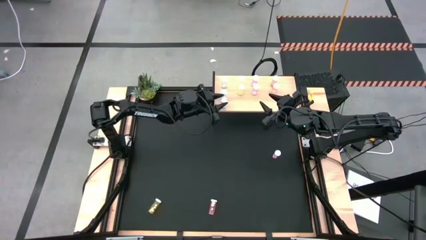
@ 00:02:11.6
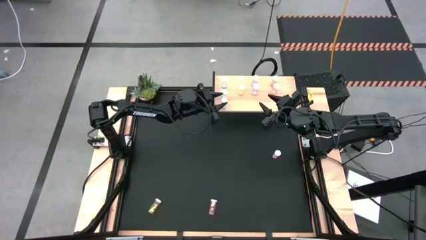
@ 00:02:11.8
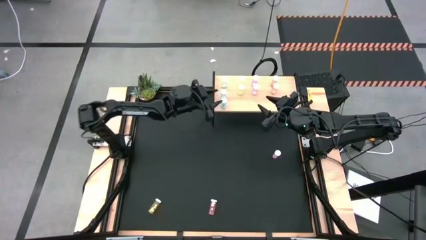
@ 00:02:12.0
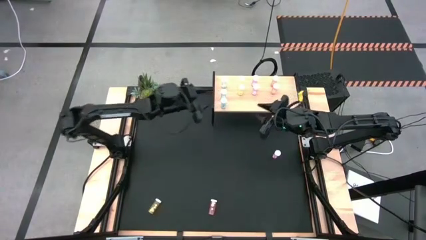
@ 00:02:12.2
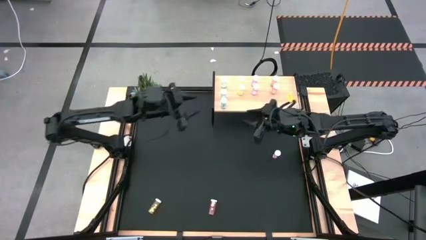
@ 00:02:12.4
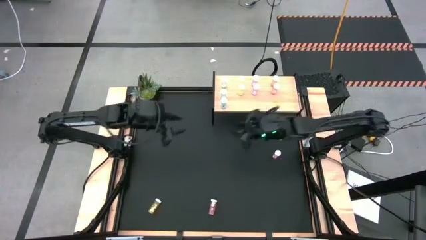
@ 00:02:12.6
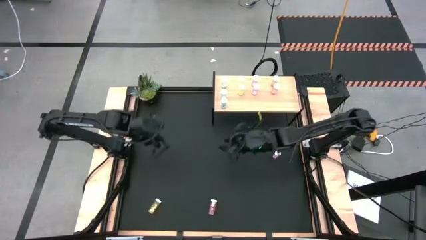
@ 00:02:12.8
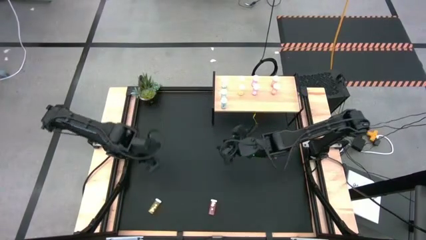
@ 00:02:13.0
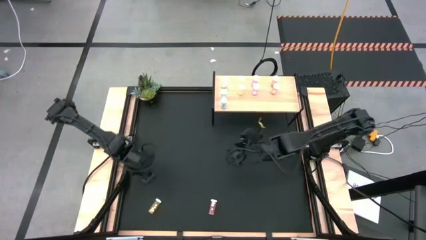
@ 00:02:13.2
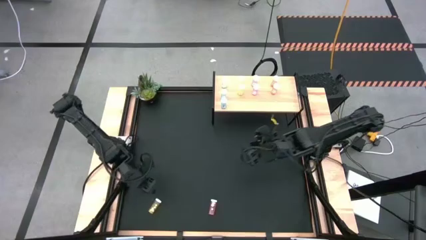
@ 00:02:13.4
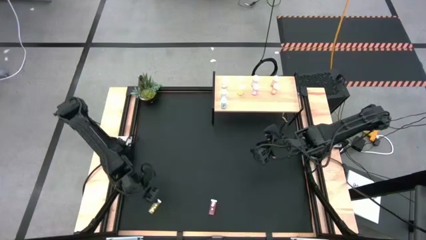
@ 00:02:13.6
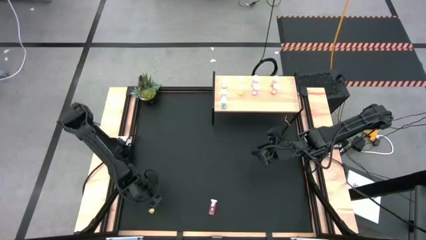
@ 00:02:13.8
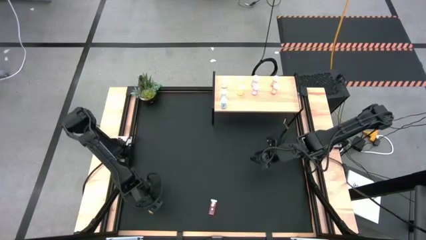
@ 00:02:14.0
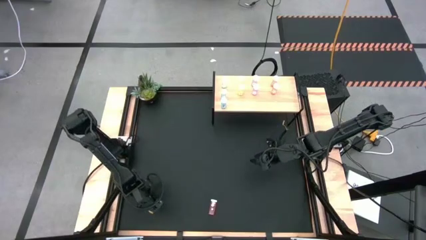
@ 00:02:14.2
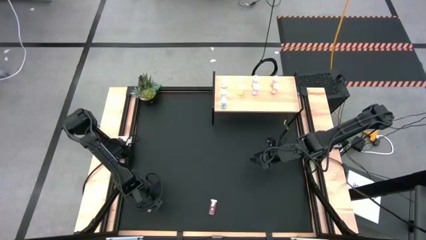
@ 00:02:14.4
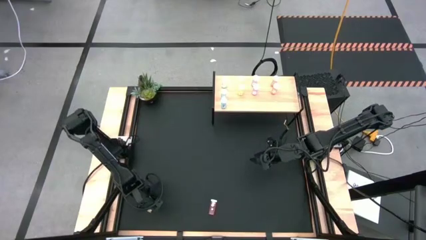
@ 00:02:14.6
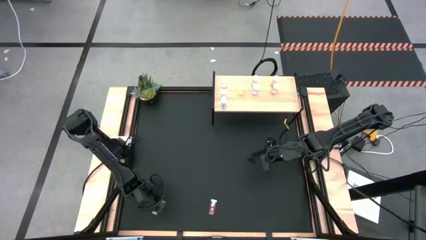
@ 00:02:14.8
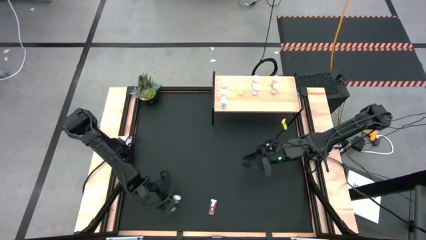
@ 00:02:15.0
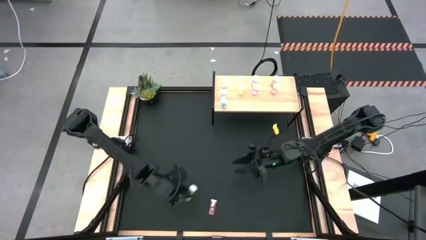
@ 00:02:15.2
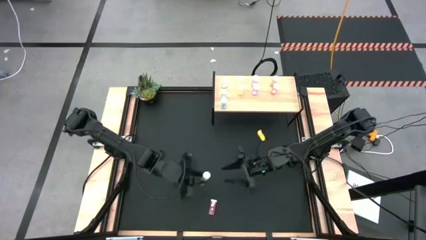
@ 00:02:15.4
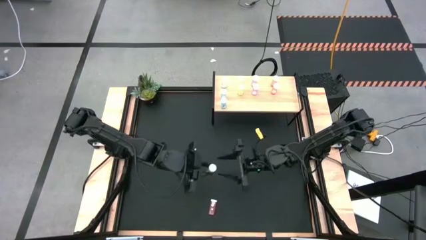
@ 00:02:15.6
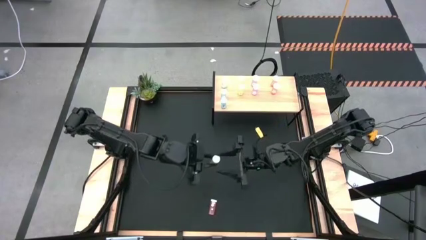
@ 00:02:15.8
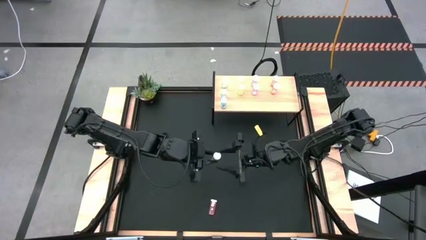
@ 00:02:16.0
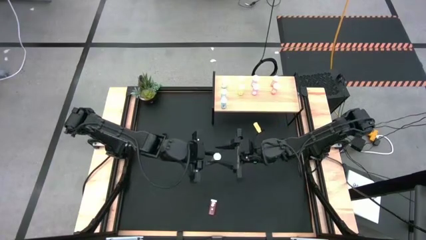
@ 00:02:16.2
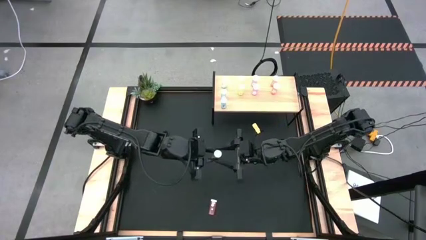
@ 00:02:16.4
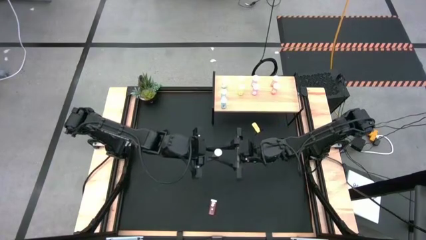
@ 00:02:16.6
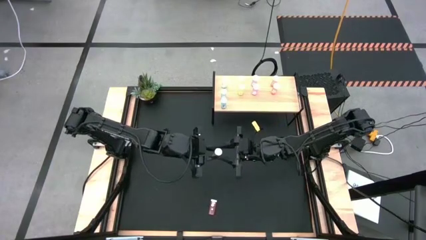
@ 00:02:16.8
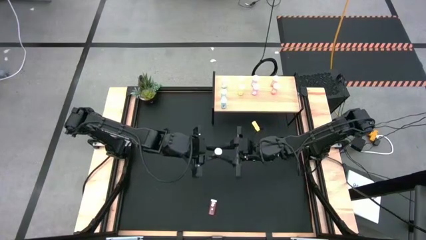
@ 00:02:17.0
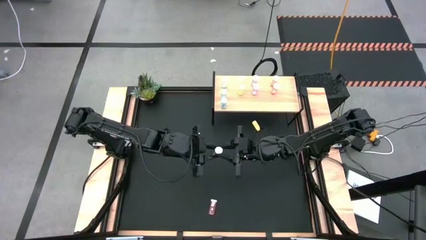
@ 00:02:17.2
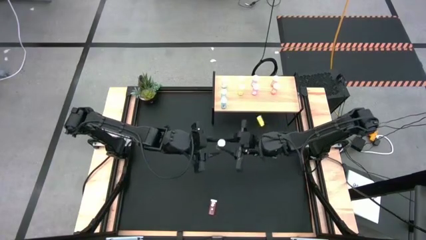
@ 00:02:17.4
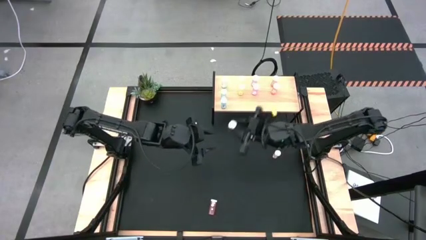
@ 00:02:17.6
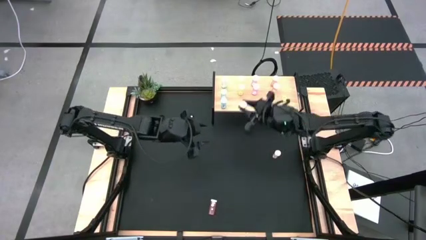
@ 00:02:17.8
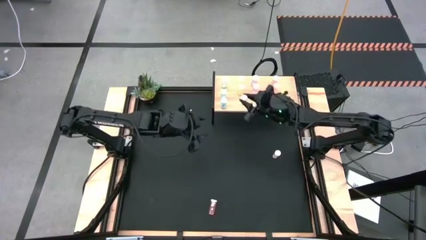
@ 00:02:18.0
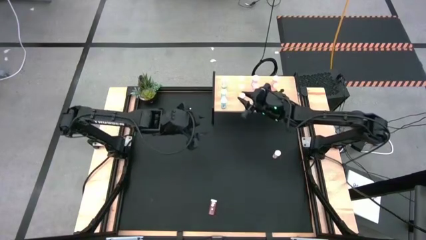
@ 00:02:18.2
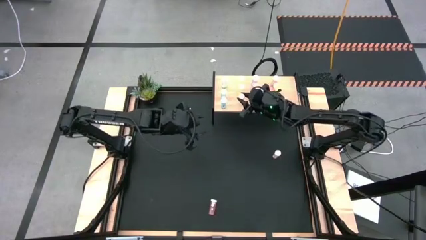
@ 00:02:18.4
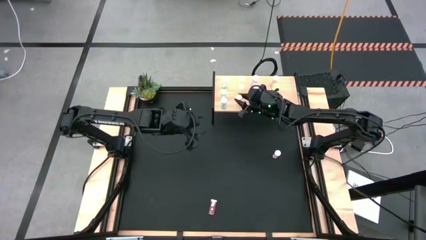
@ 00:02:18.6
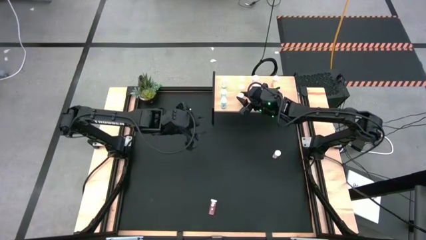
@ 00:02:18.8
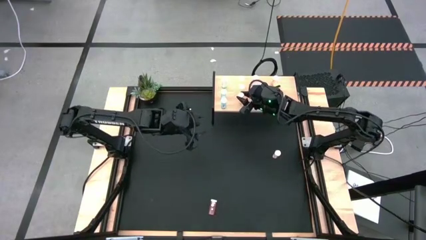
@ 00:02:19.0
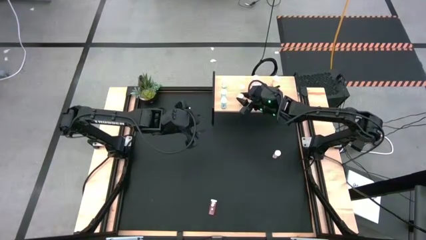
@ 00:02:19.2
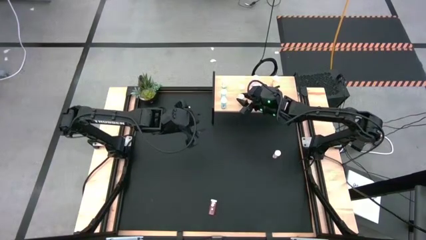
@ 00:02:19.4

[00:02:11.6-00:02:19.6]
Task: Pick and place medicine bottles onto shelf by color
Put the yellow pill bottle on the shelf aligned with the other yellow pill bottles

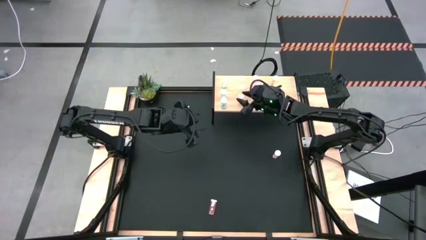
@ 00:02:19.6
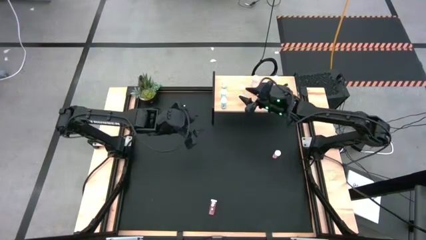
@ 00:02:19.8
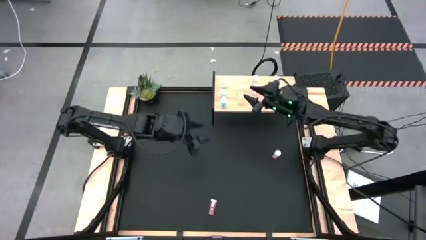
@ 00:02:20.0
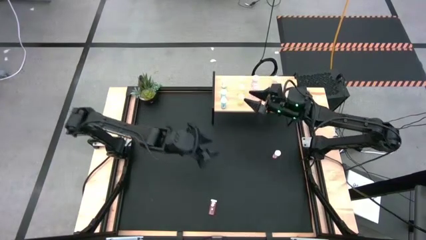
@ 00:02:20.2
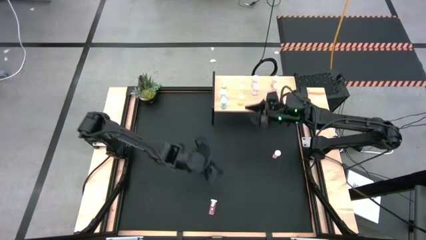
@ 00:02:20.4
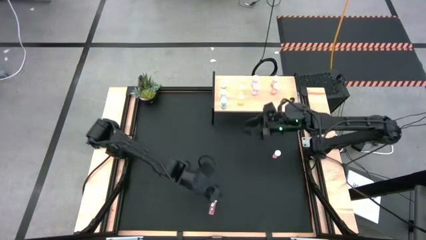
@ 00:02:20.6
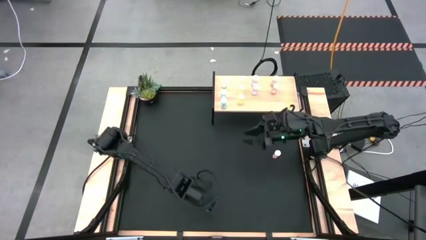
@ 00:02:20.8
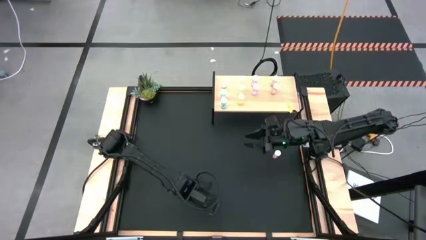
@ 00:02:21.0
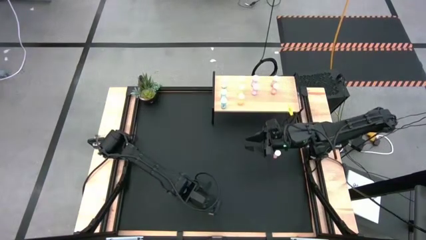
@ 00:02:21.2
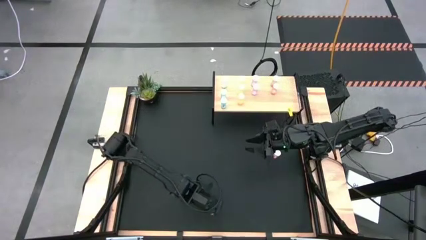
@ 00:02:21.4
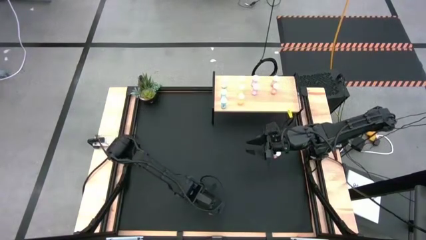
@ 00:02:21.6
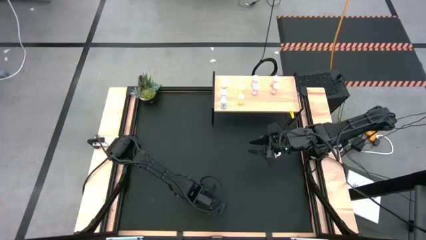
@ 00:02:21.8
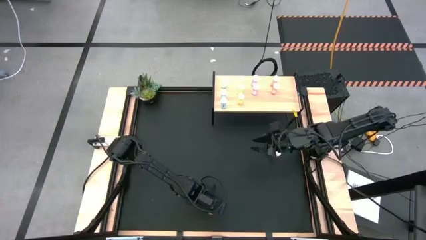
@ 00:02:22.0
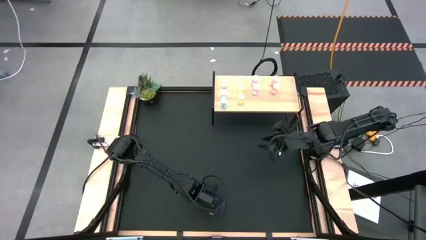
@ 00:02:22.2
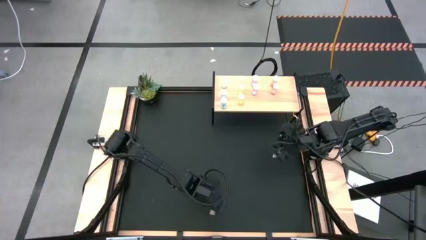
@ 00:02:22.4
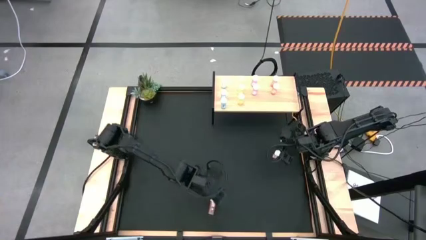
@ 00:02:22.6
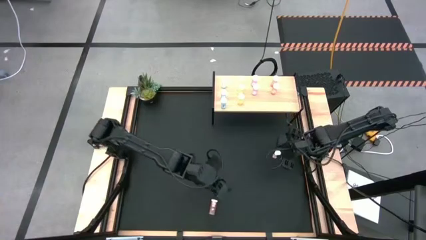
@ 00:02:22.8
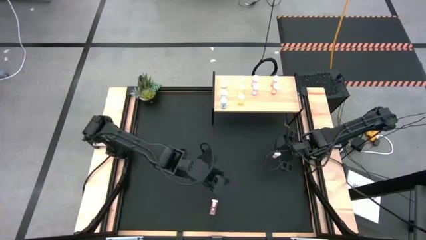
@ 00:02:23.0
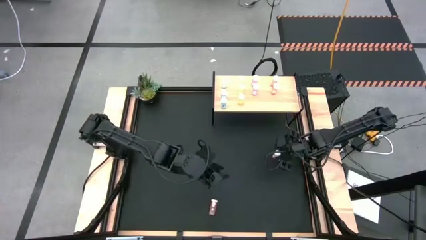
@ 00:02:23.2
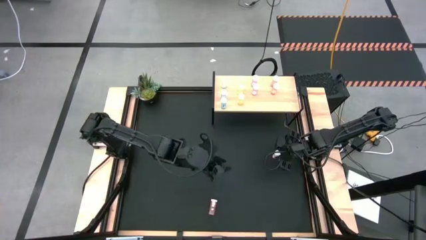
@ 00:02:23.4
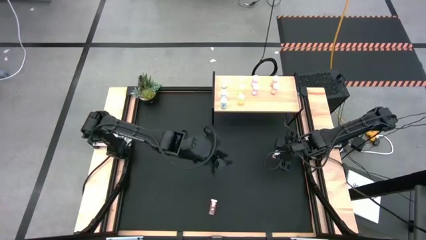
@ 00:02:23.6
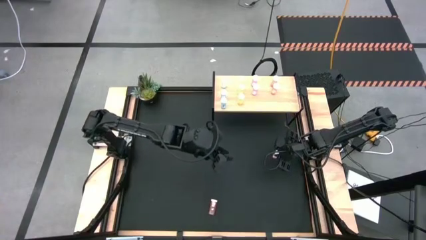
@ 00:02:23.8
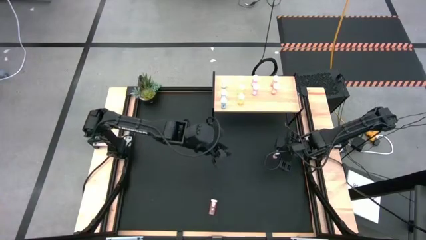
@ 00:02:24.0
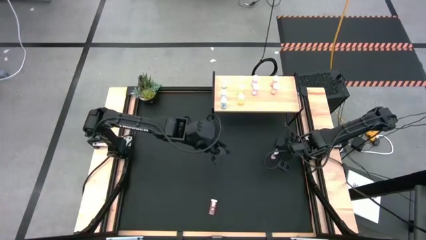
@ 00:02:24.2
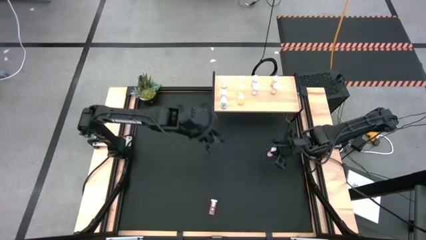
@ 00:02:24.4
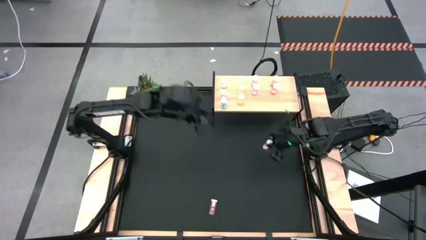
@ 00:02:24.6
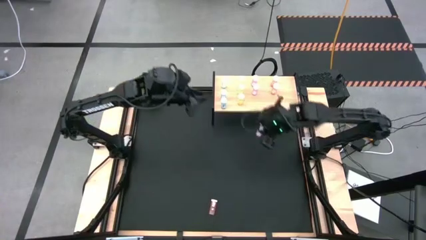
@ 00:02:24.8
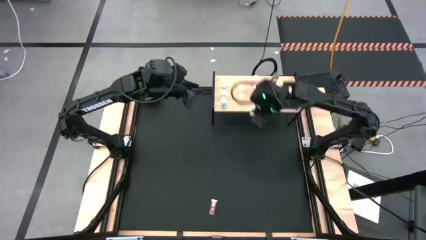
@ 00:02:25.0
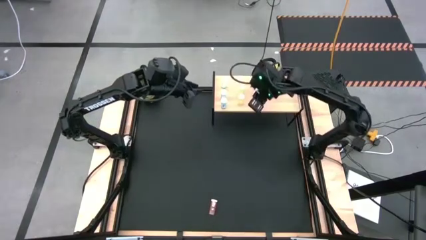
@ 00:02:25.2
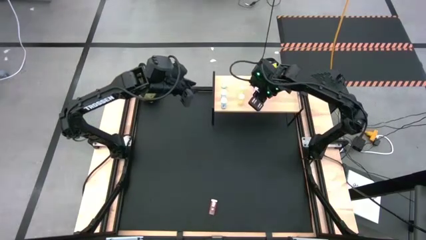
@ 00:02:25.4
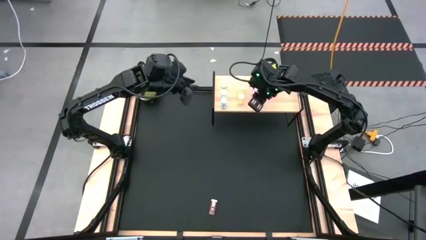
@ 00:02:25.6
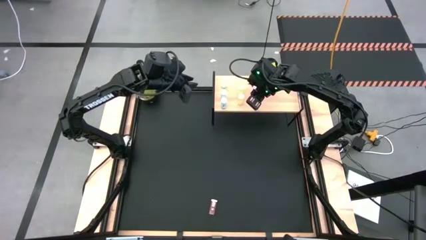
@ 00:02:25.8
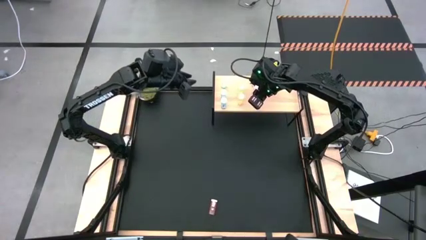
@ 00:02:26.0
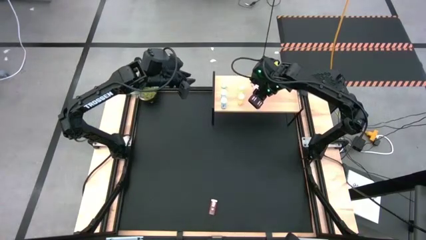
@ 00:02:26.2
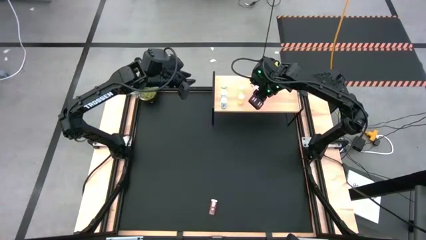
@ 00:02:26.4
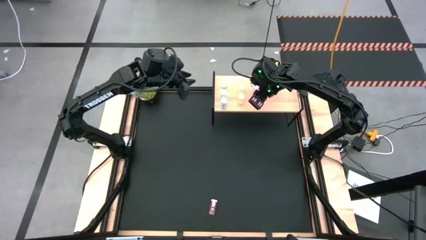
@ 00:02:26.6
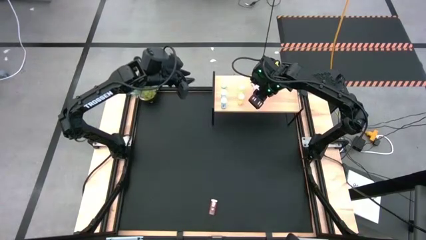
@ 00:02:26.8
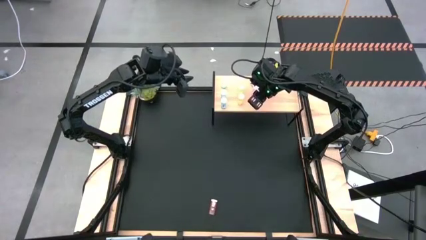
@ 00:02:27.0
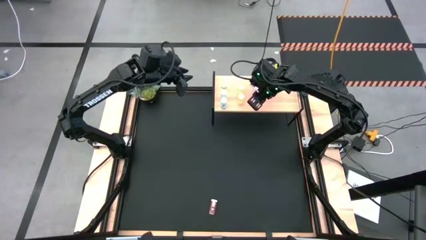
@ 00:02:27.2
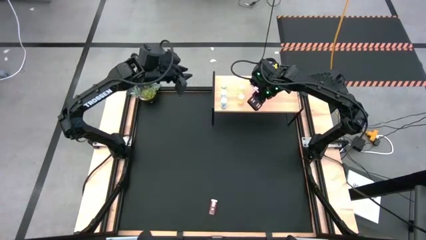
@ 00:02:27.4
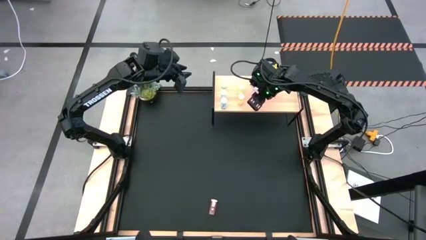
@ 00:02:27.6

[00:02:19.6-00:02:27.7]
Put the pink pill bottle on the shelf aligned with the other pink pill bottles
